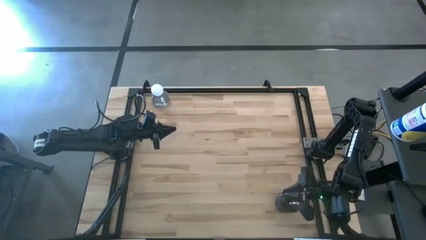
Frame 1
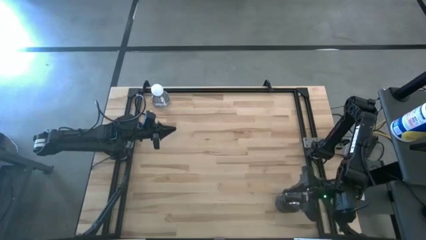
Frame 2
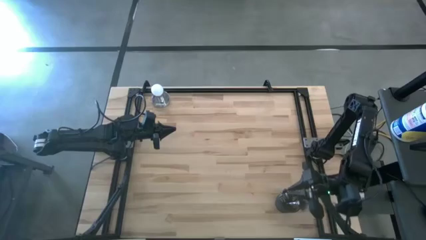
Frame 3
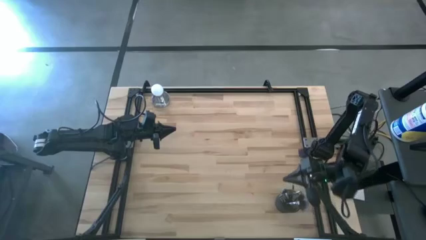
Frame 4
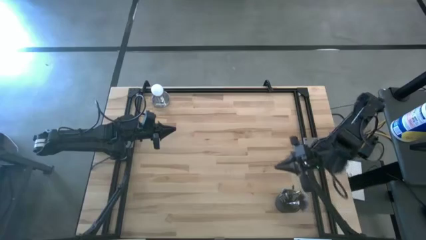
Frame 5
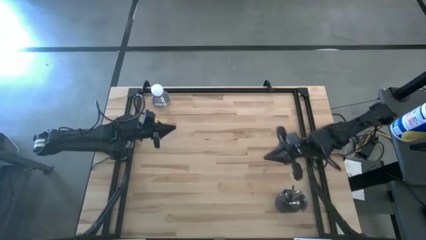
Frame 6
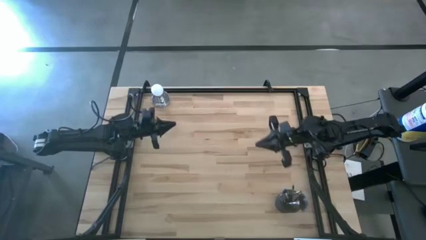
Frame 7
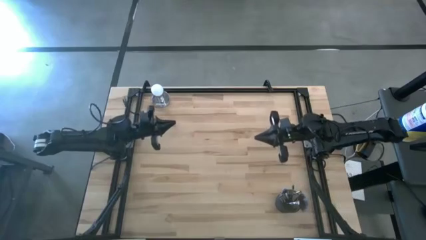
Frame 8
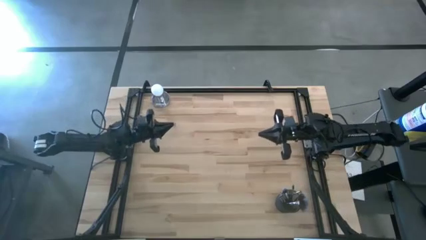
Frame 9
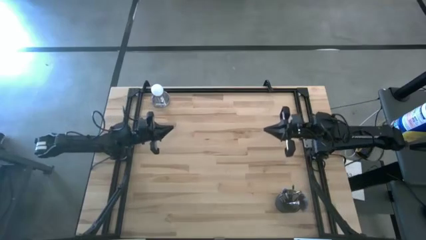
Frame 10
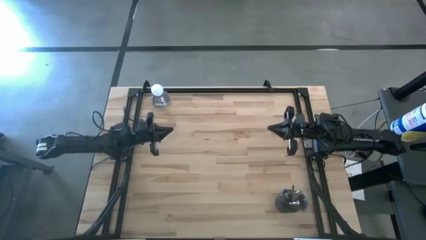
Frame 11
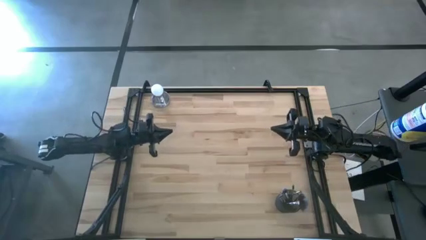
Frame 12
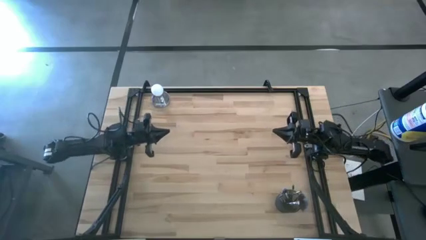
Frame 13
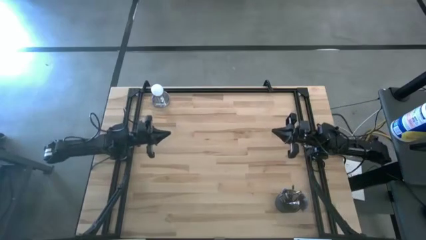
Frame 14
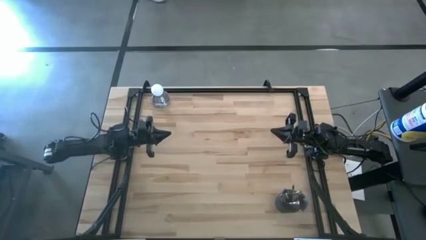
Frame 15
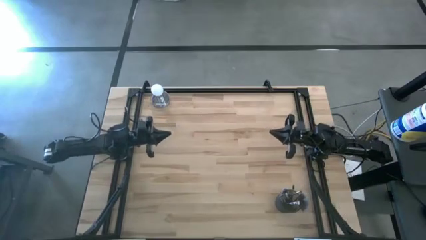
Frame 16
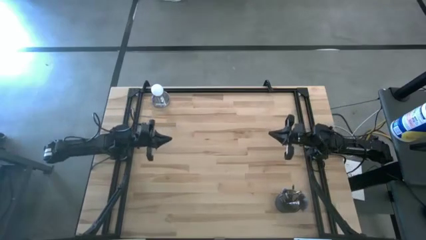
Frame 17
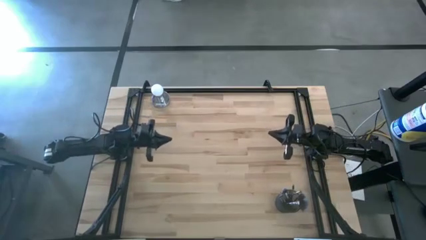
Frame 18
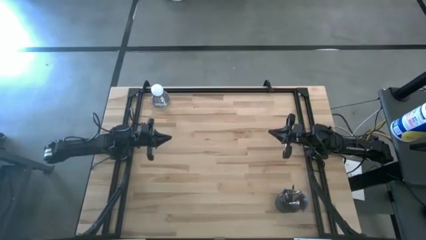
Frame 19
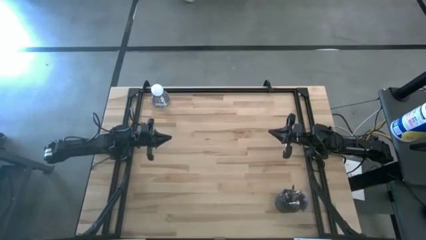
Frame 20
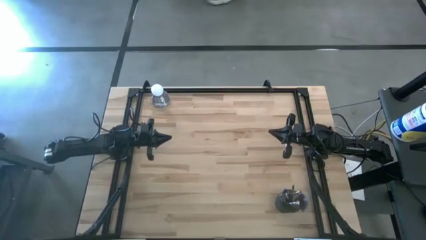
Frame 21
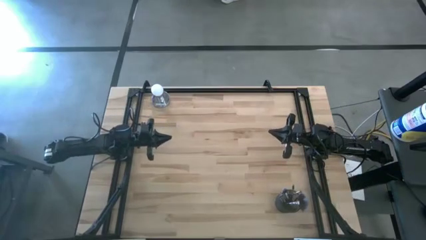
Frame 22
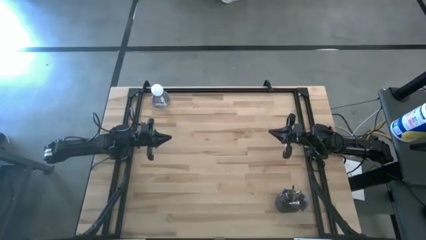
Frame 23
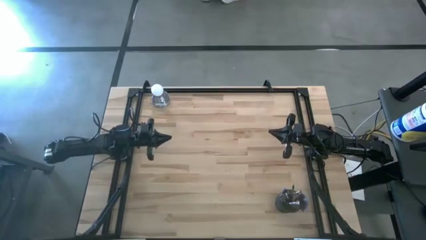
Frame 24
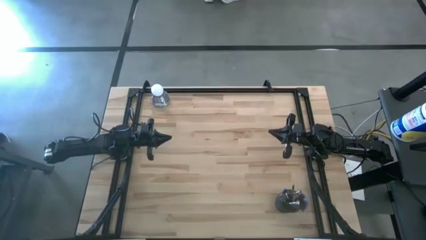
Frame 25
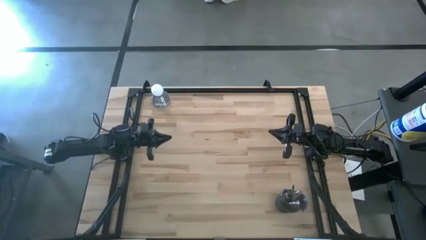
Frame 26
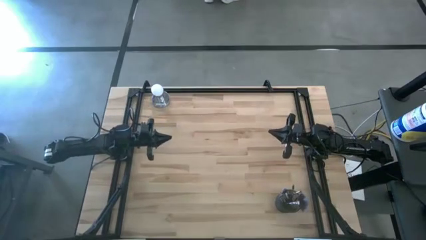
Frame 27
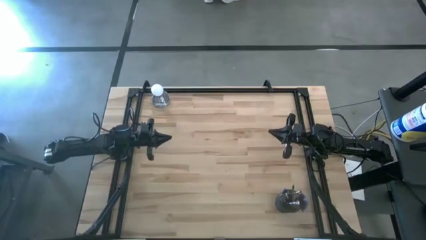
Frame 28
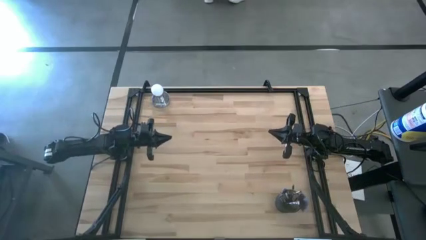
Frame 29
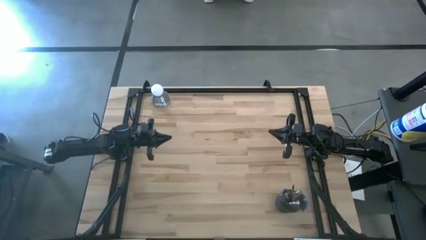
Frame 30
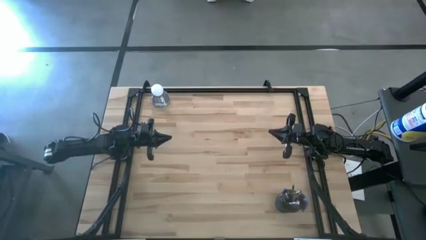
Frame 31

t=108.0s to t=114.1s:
Task: Put items in baskets/containers
Return to Home Position

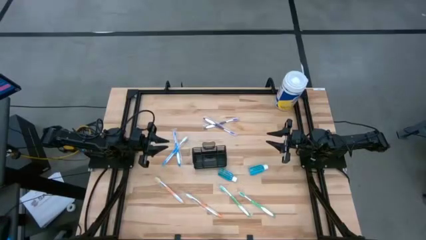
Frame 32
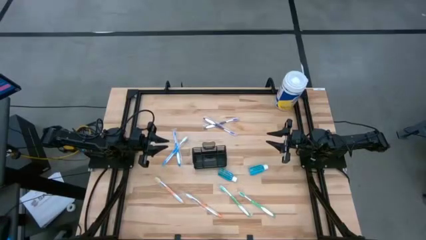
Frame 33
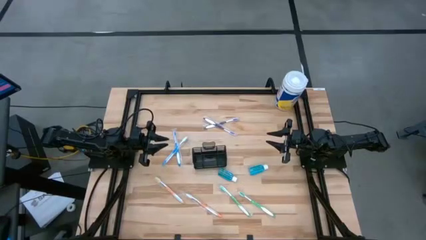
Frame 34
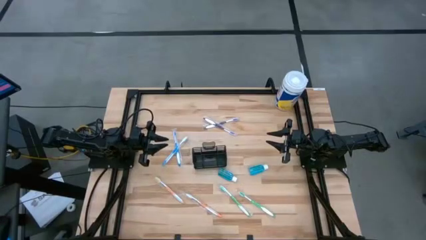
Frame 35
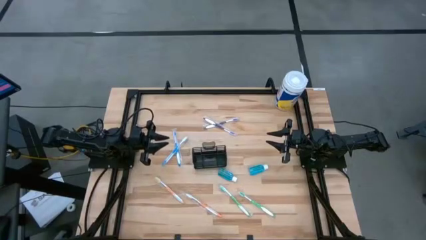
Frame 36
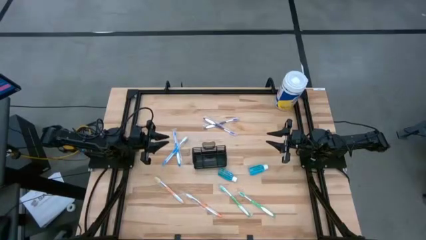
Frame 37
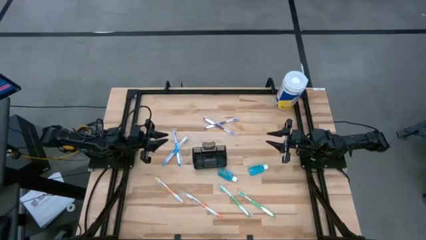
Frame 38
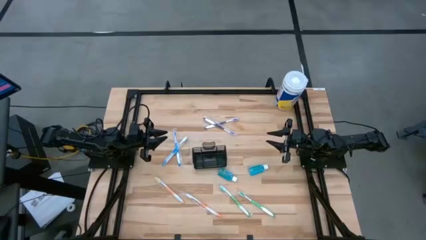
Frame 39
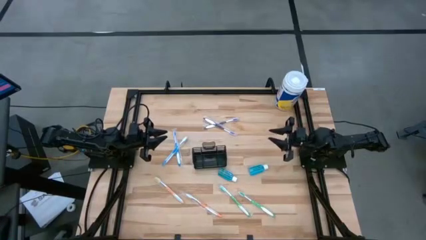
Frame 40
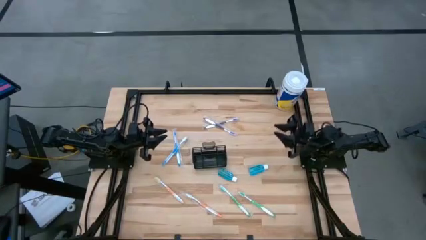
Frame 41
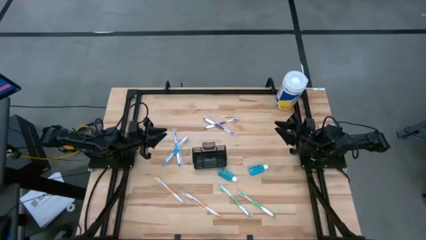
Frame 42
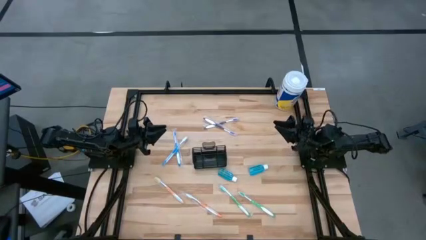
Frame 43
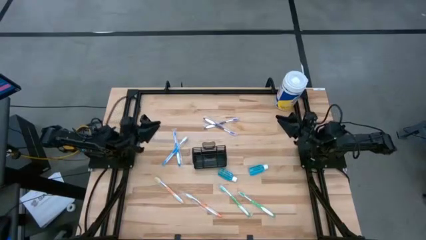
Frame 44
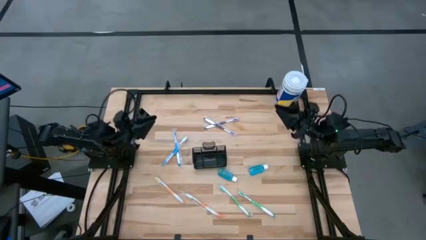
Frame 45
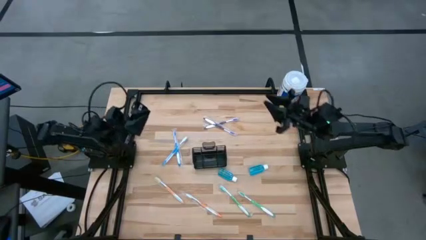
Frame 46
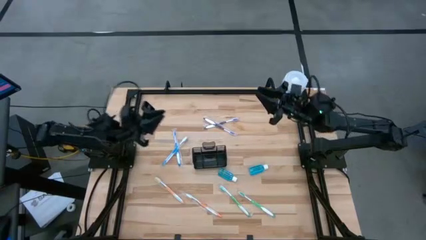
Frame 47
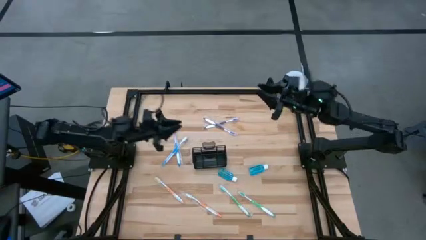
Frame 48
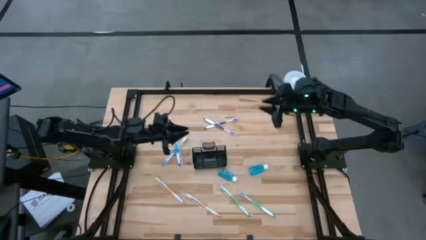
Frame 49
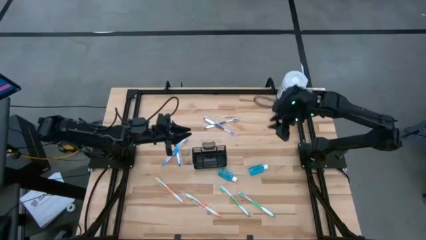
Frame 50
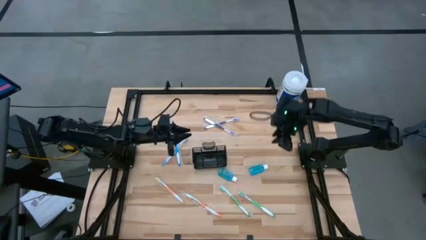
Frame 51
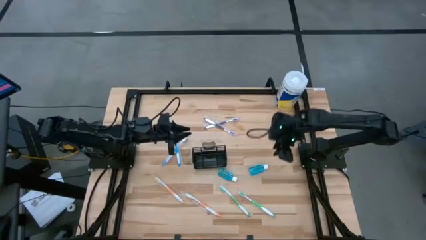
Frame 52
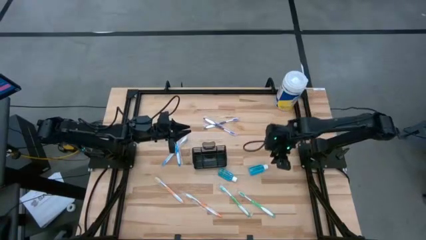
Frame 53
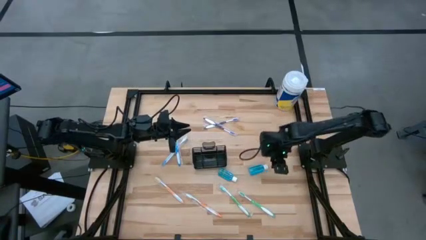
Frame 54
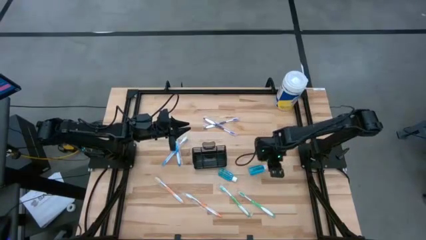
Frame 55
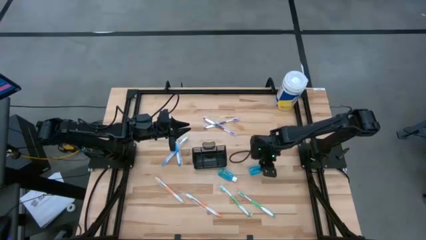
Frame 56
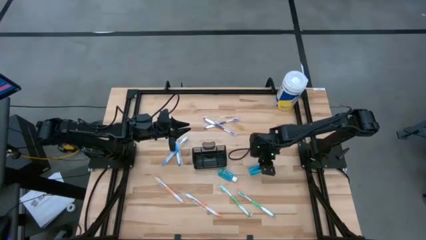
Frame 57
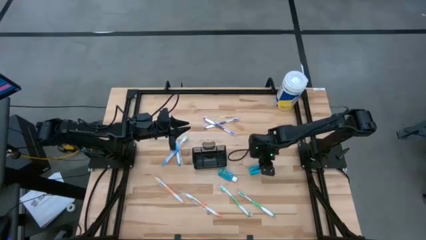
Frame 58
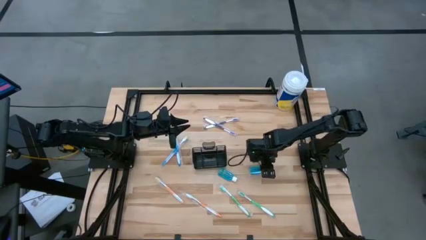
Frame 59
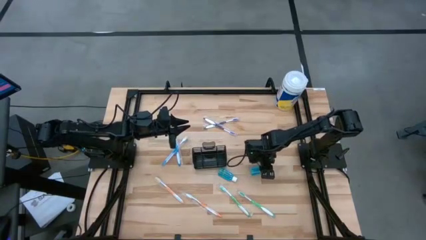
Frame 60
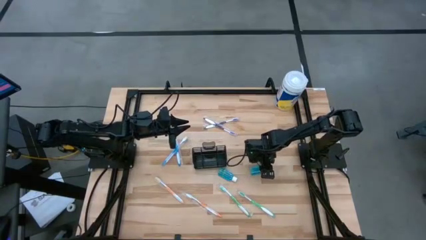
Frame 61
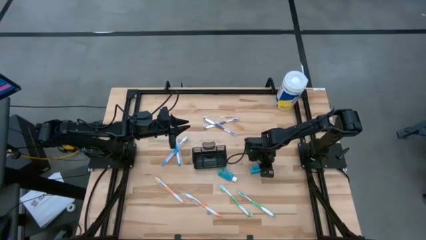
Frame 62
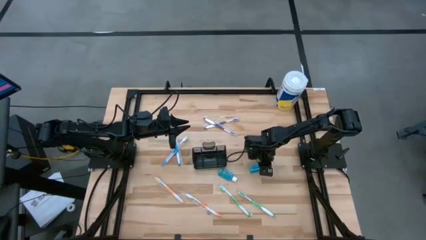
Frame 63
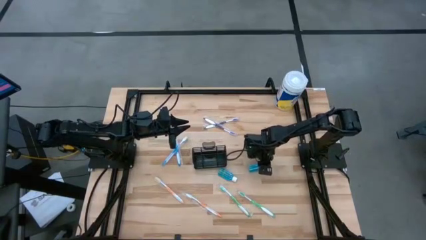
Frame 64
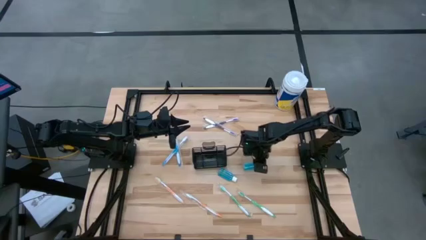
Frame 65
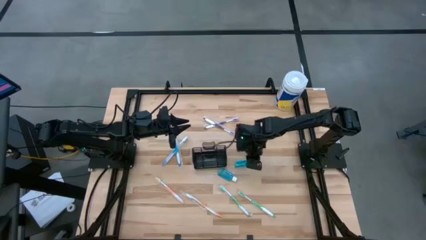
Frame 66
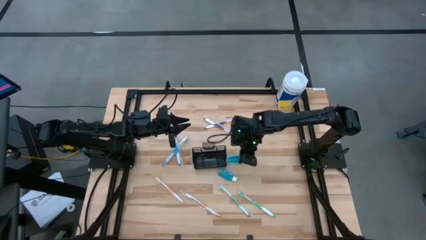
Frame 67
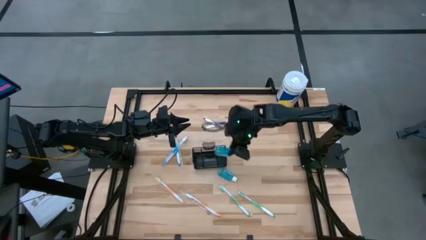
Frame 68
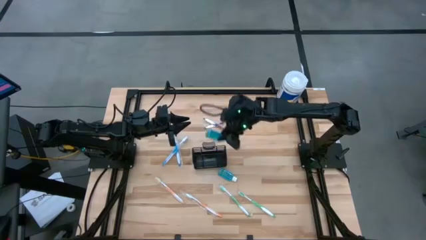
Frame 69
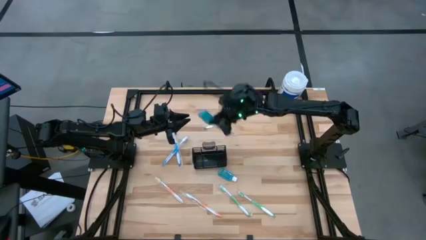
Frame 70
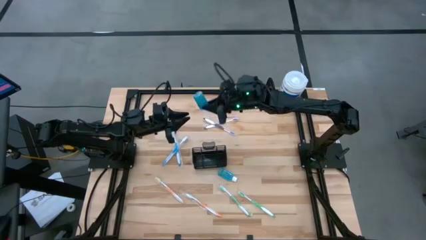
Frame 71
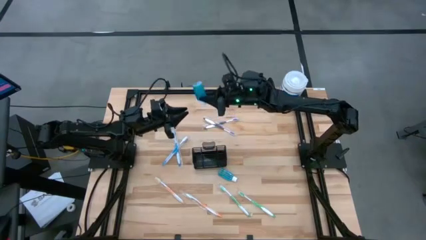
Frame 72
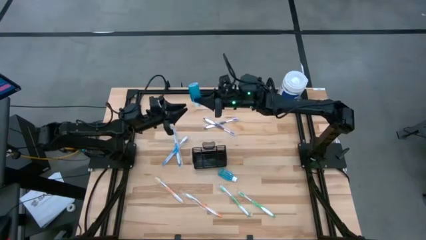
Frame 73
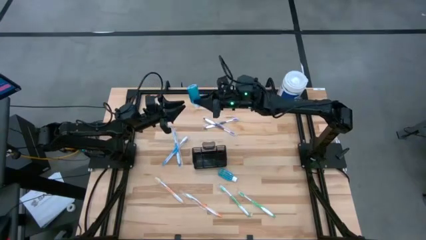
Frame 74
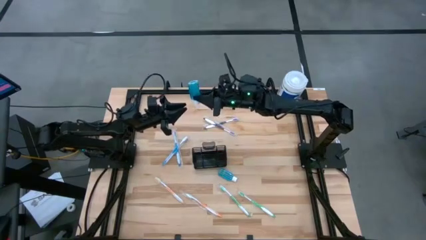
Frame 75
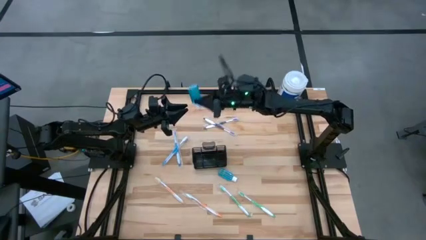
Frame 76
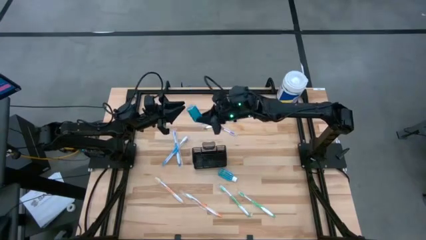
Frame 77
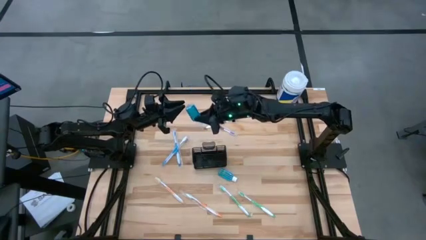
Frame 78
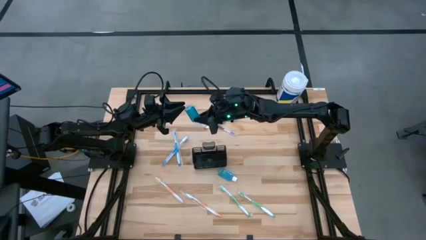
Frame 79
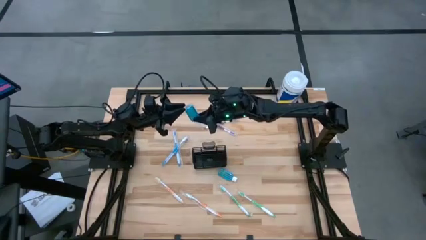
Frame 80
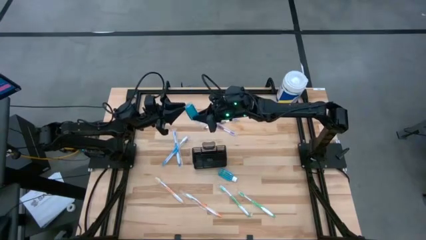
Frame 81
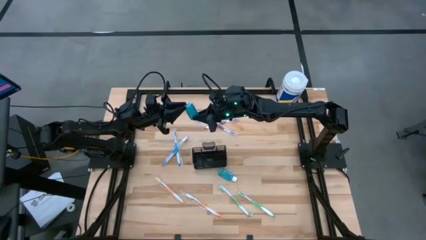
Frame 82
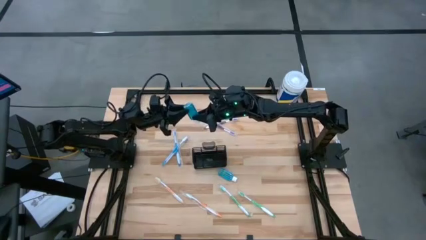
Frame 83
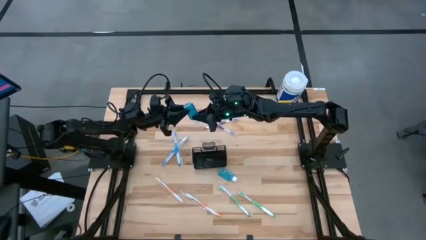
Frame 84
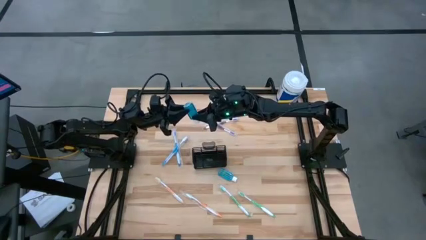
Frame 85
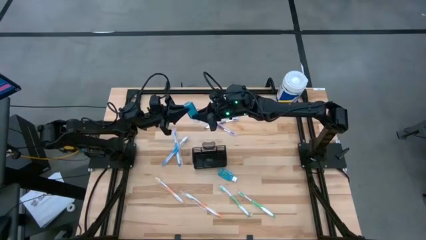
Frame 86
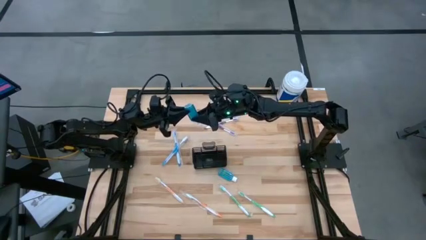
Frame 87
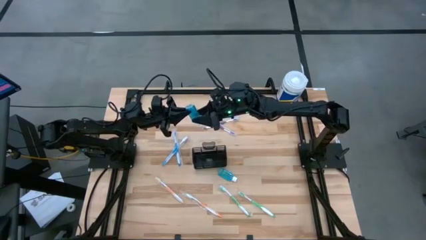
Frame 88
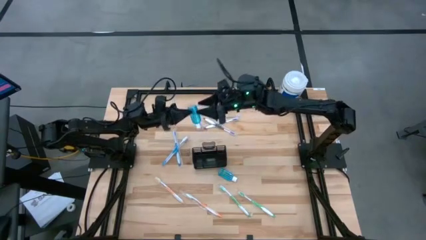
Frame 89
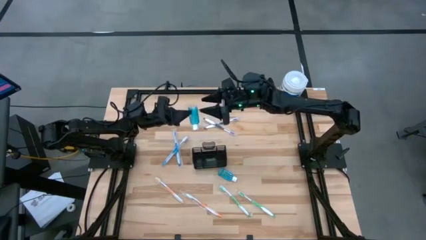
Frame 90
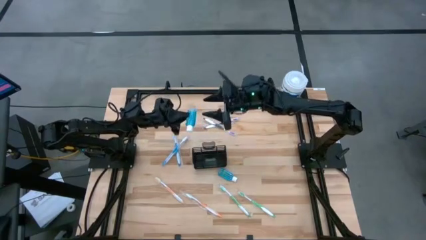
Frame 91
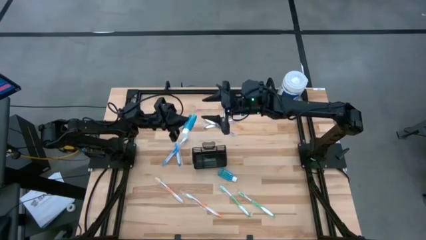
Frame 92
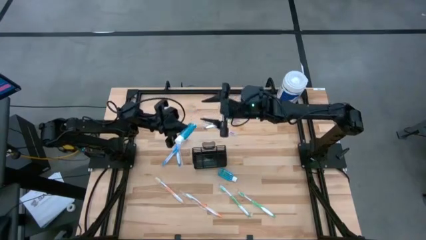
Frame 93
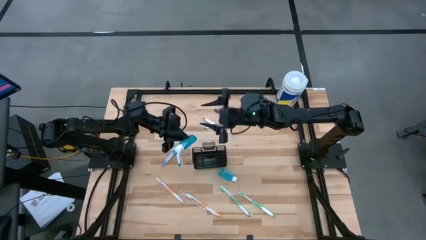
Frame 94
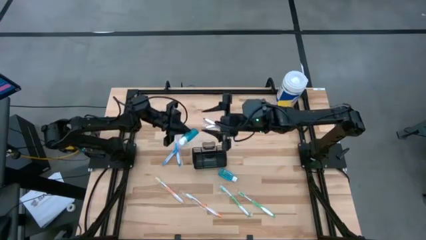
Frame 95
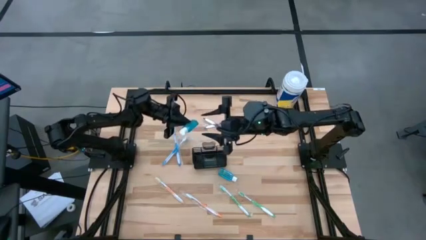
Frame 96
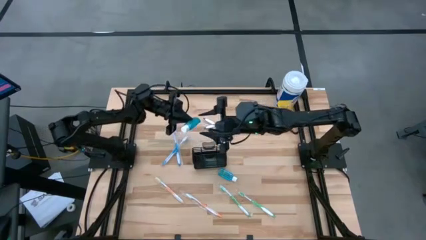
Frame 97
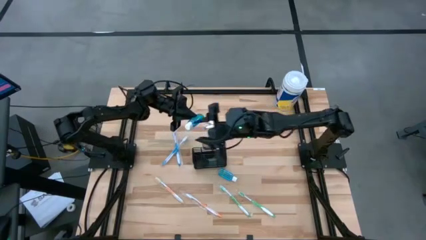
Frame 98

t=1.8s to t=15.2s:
Task: Pick & Place toothbrushing station
Put the right blue mouthwash into the mesh organizer
